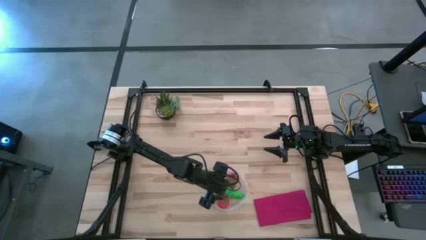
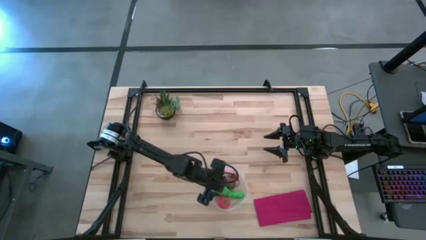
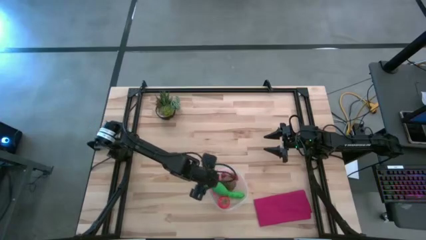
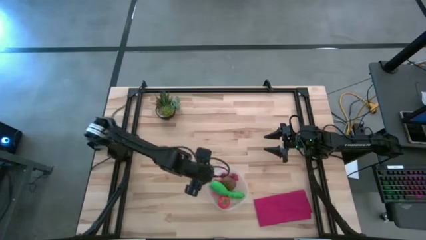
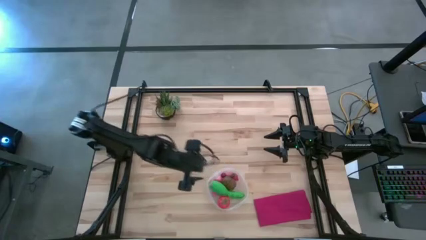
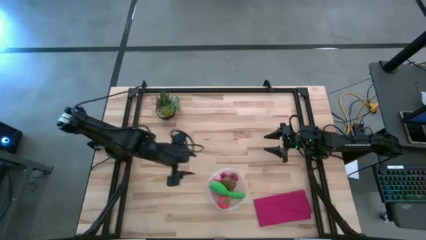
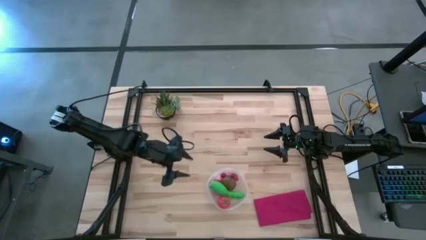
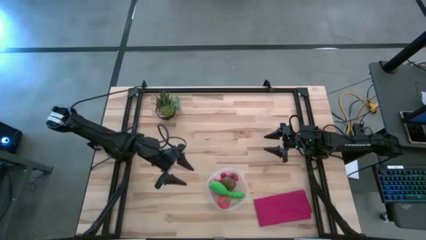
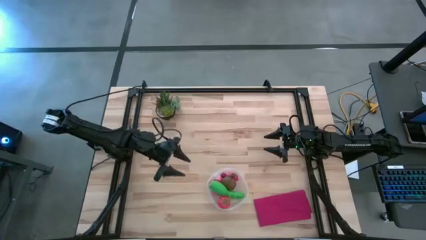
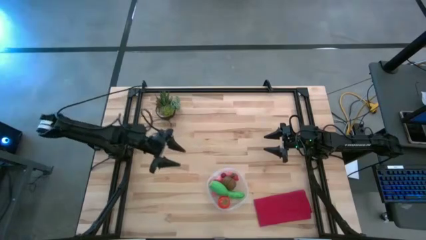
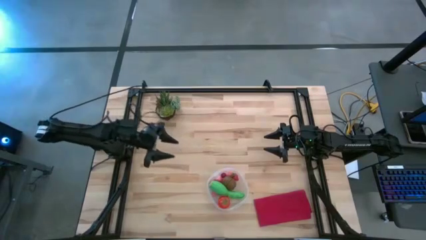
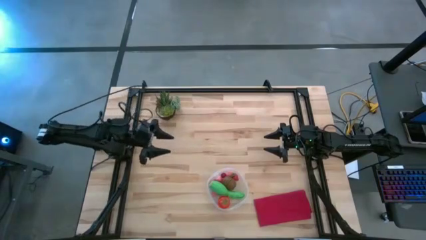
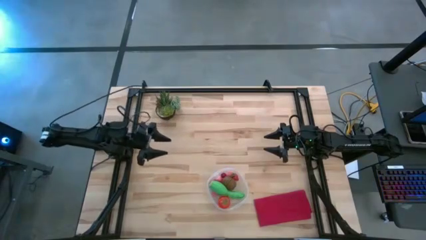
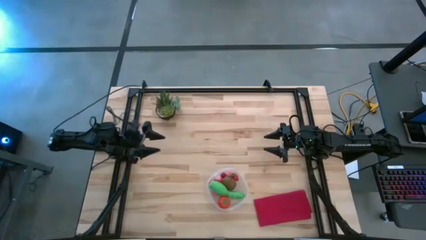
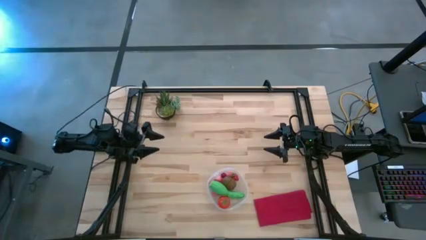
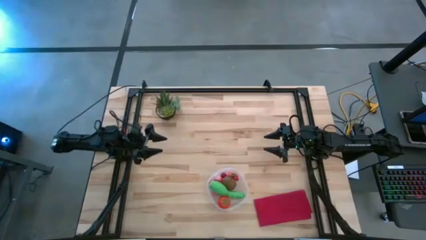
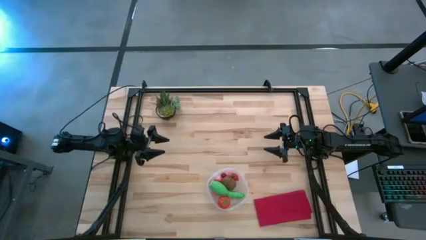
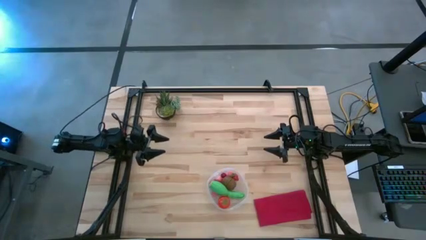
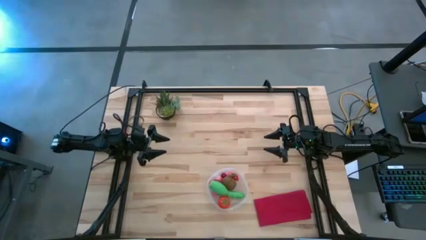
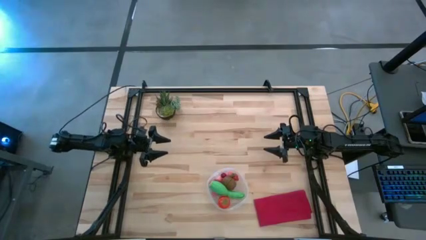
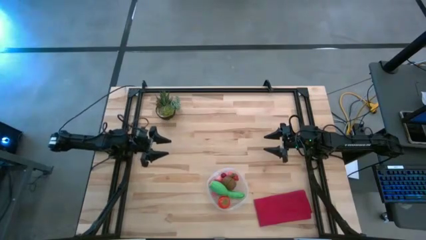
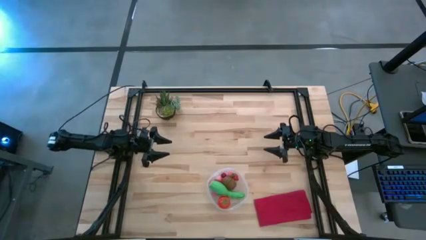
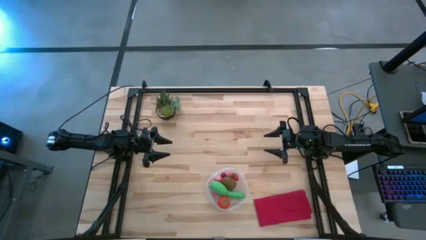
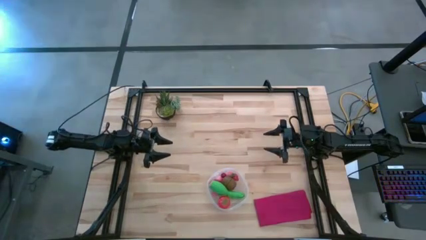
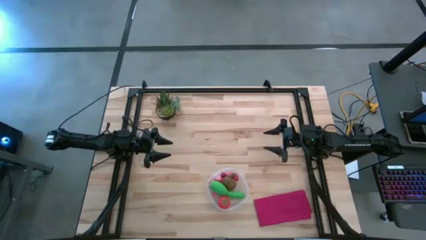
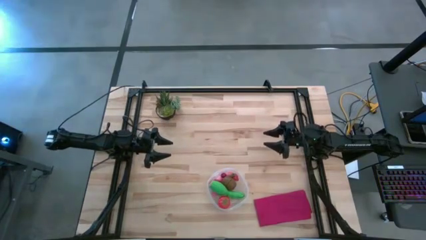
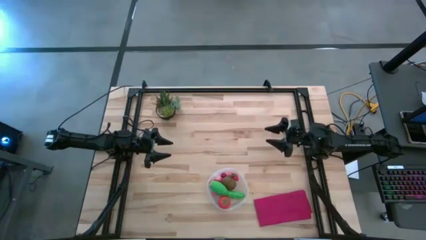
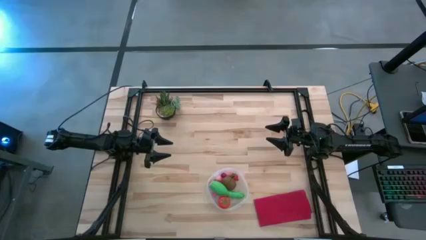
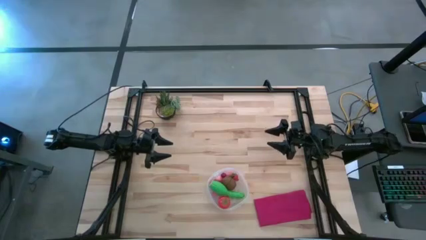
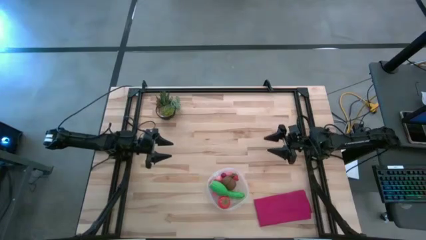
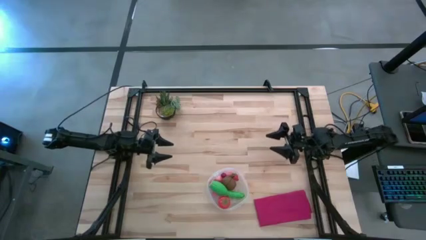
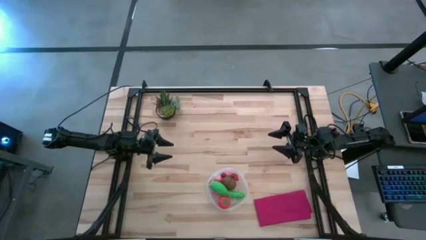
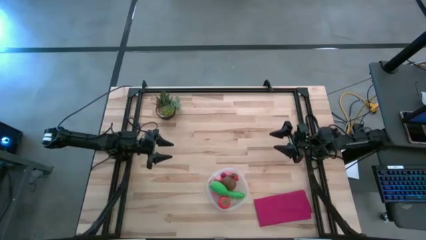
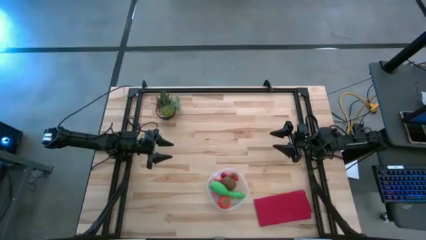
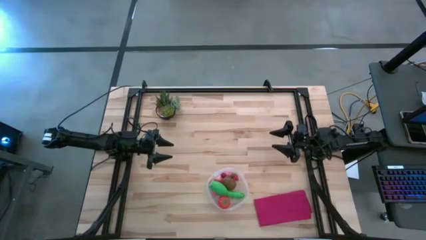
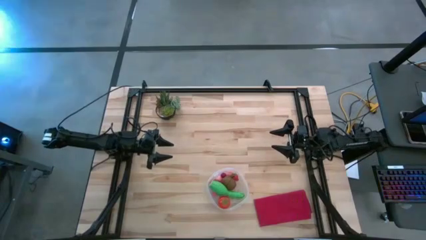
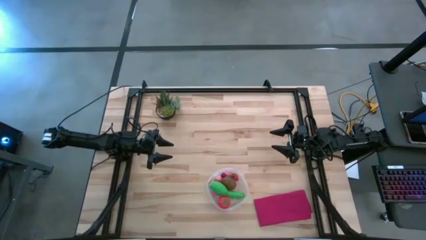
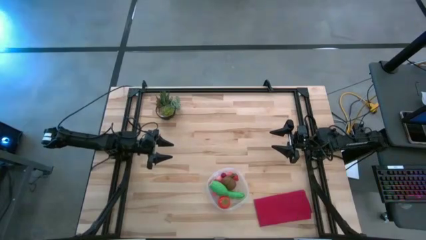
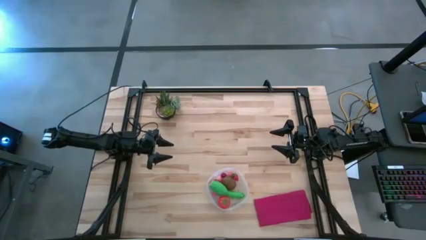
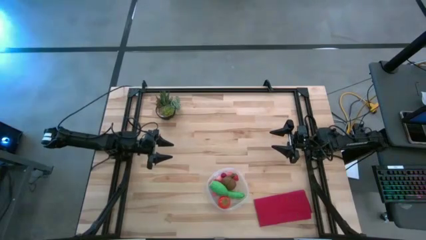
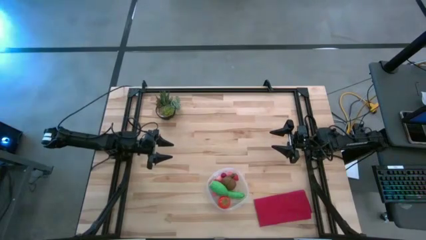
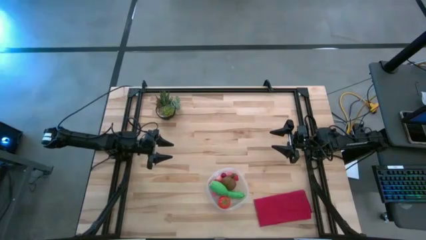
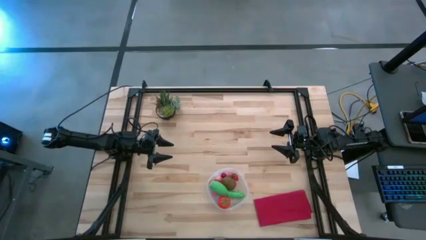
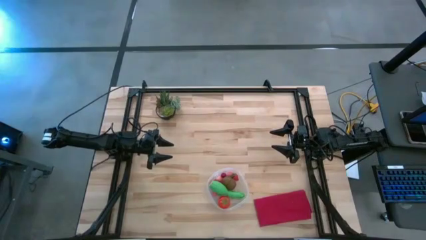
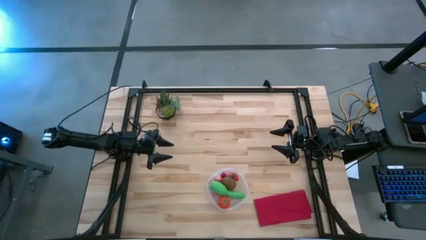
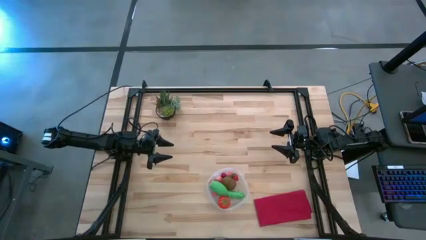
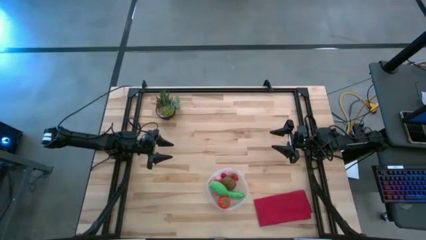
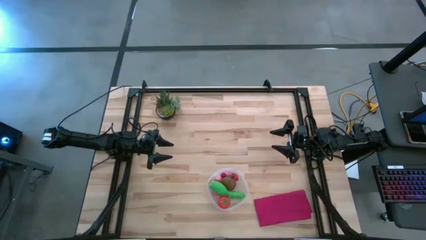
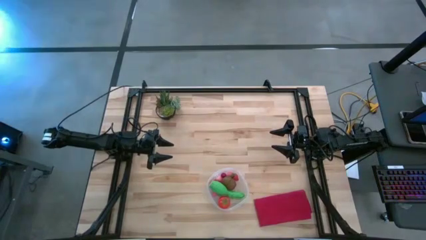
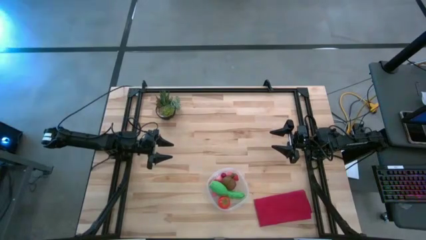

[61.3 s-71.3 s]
Task: Pick and placing Produce into tupperware
Return to Home Position

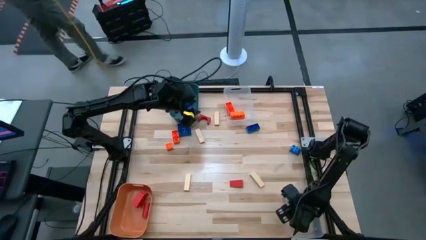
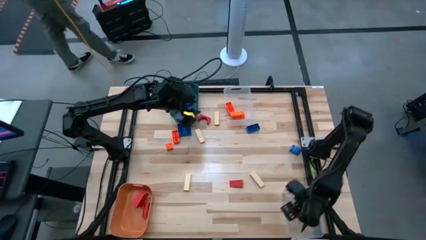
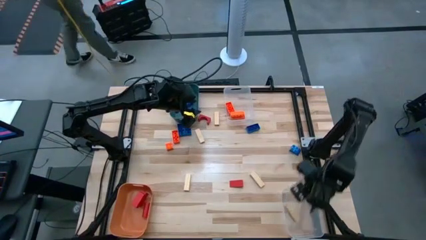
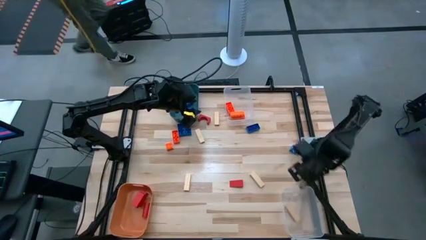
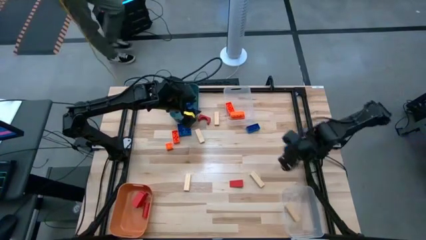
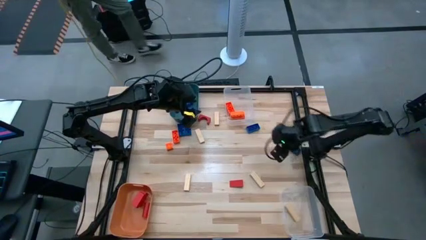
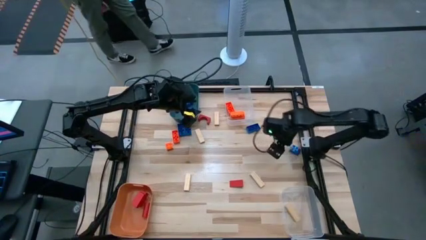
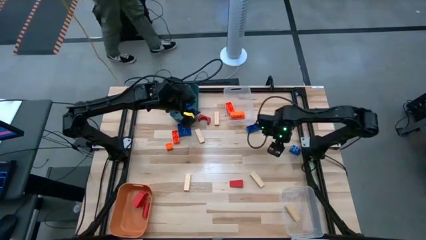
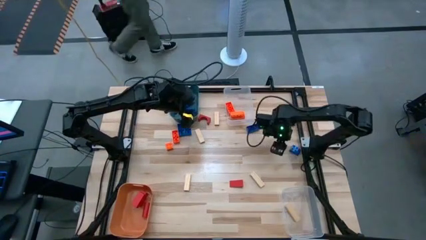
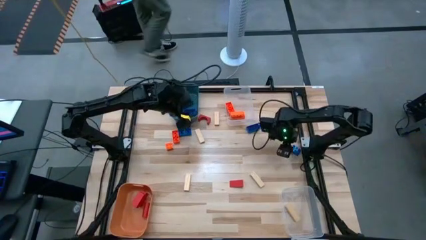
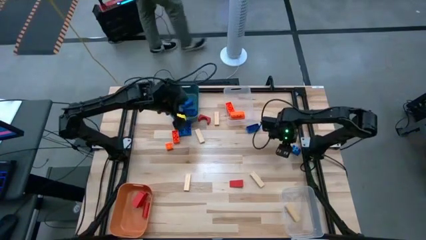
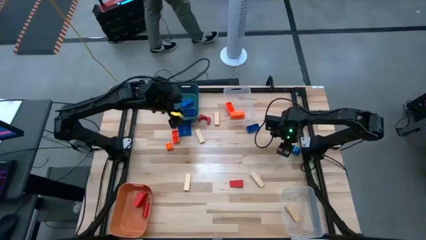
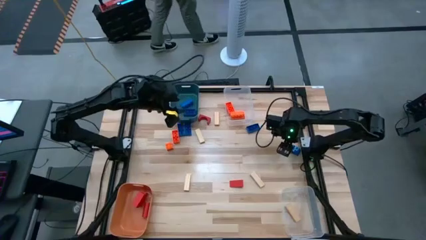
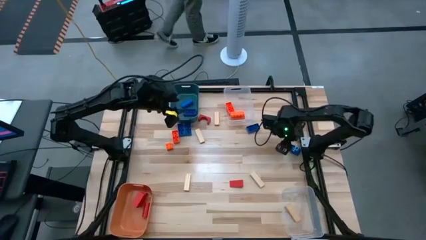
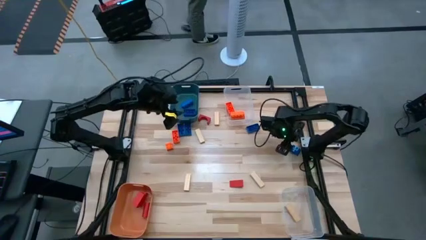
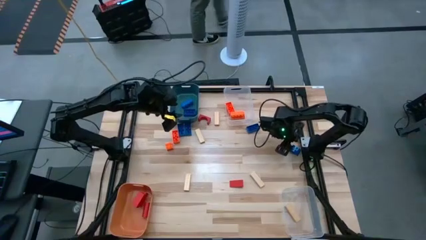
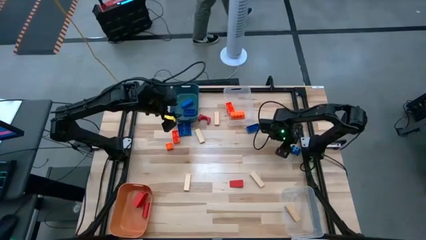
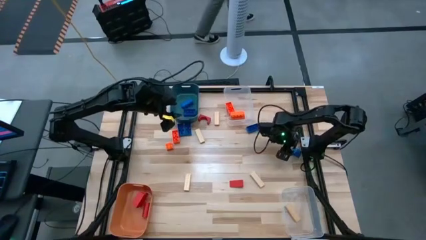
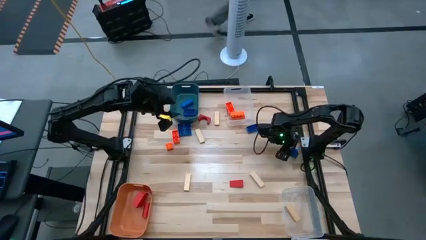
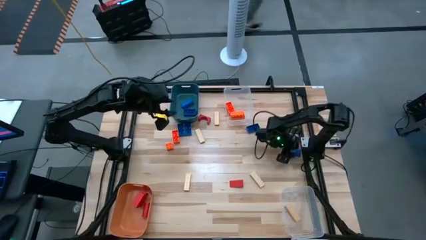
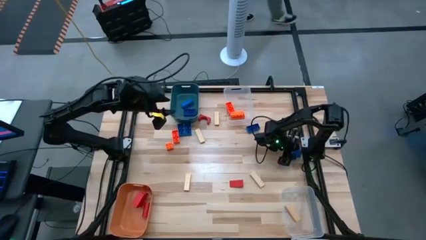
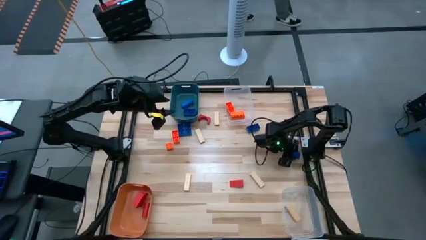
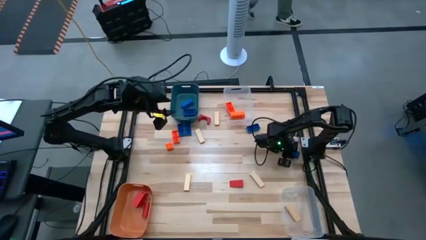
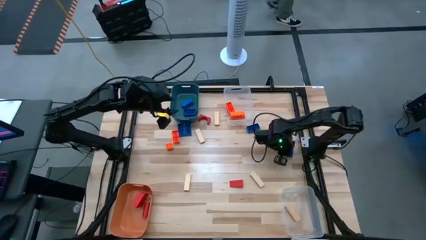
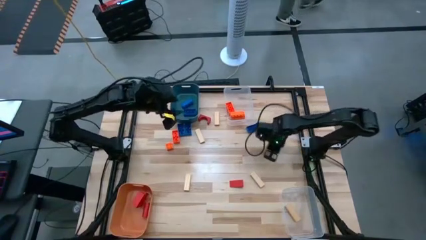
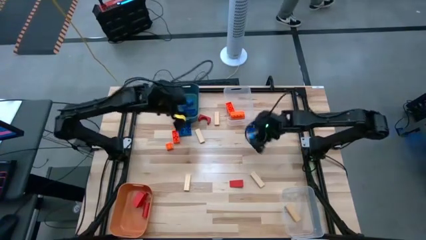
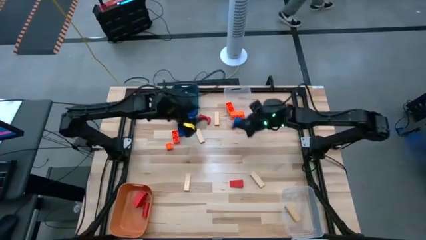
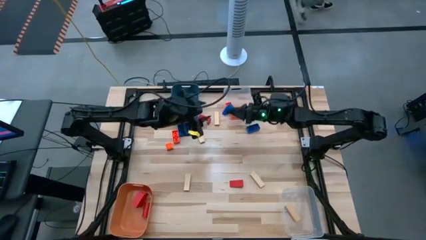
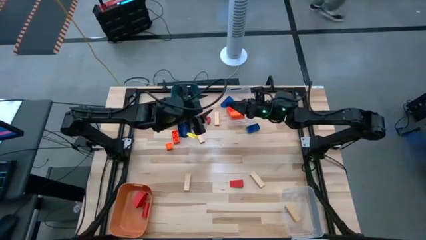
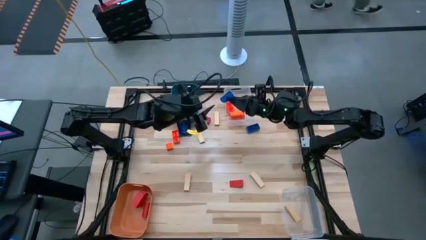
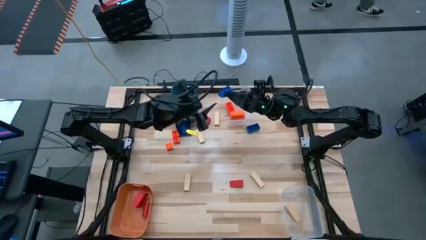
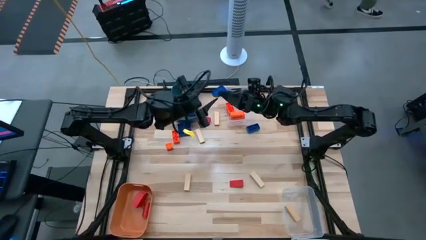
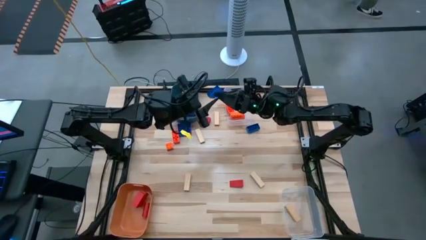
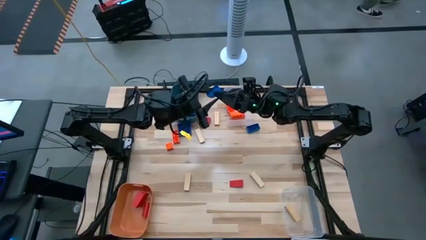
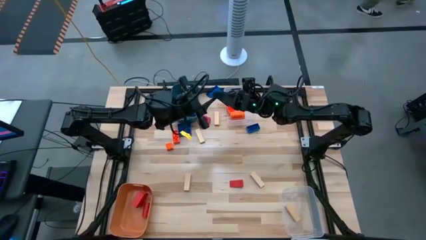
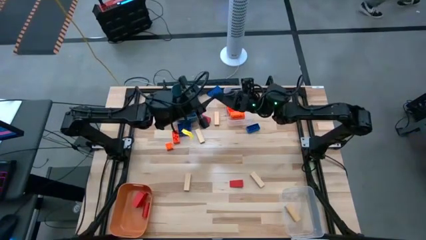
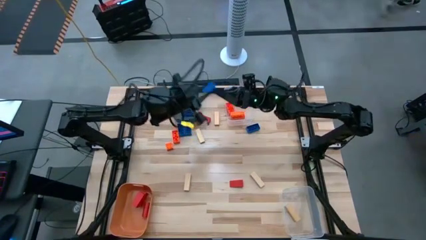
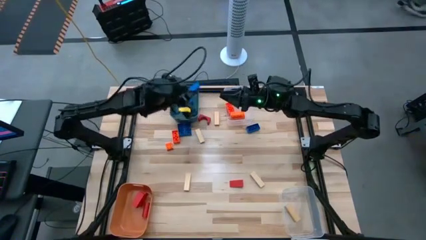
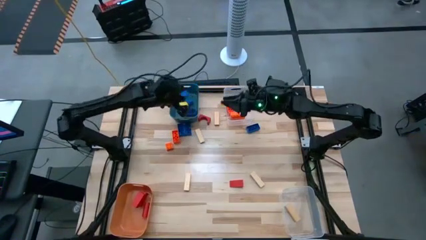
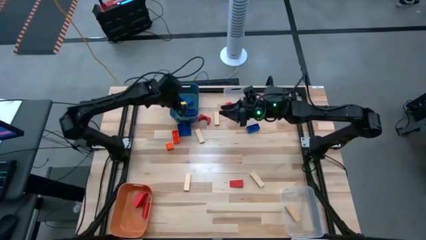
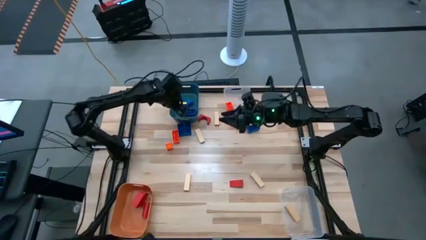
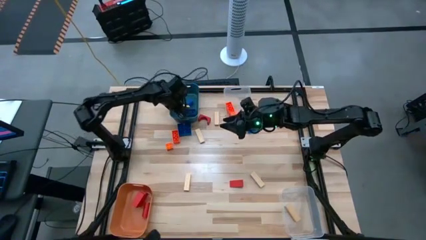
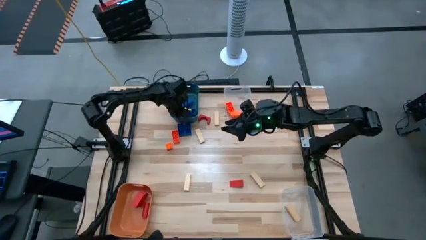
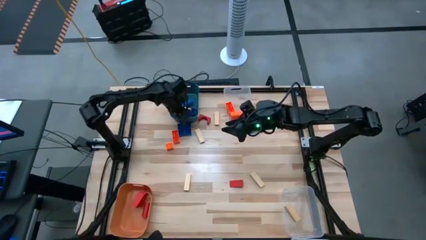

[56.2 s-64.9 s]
Task: Sort blocks
Put the blue game piece into the dark blue bin
